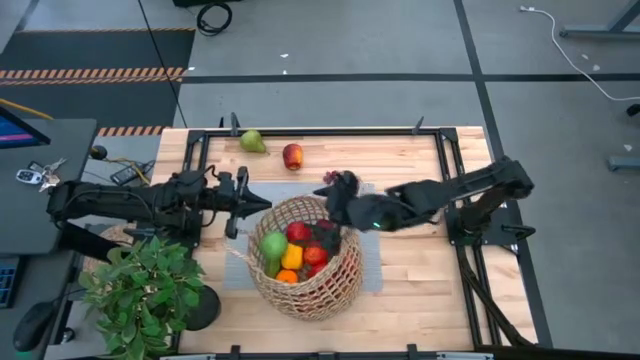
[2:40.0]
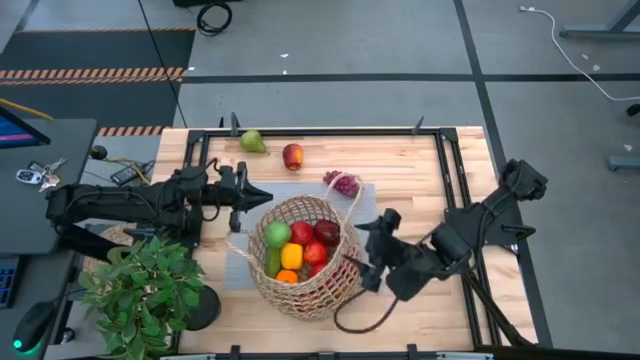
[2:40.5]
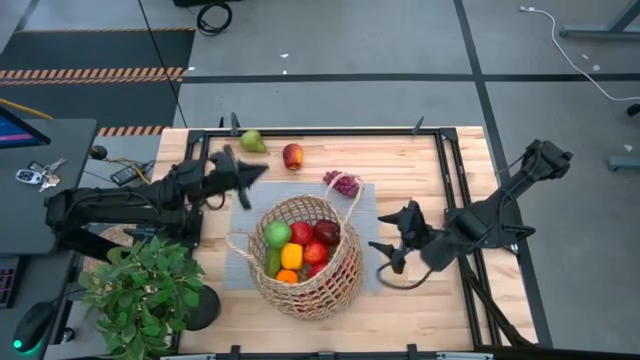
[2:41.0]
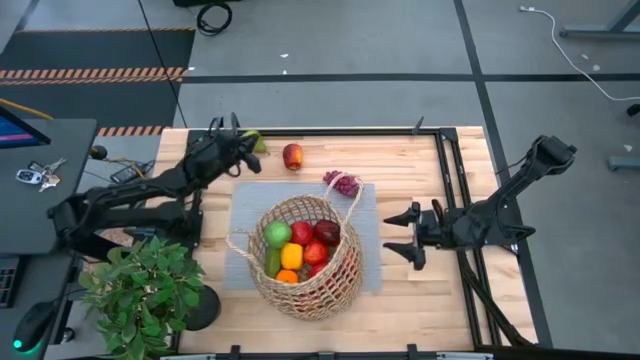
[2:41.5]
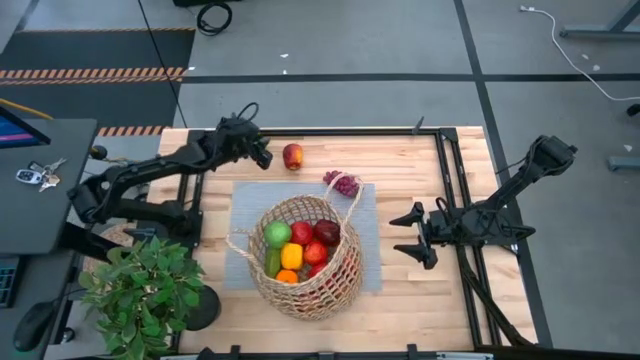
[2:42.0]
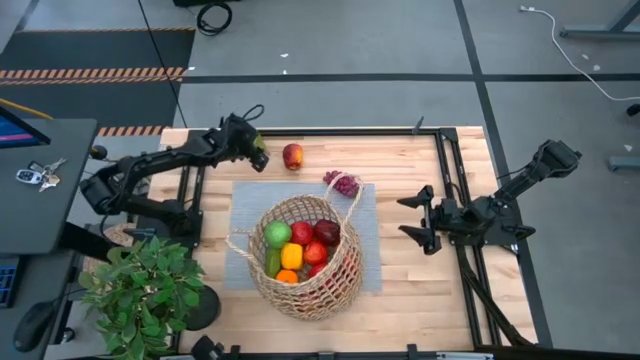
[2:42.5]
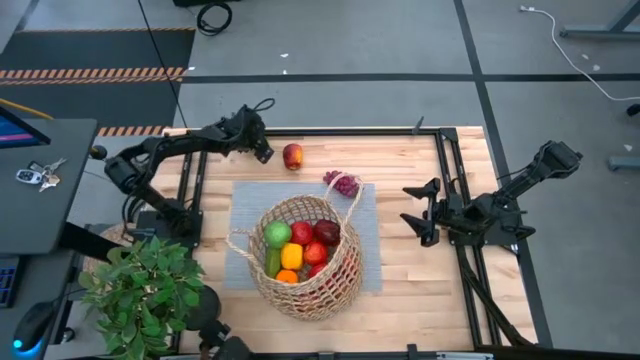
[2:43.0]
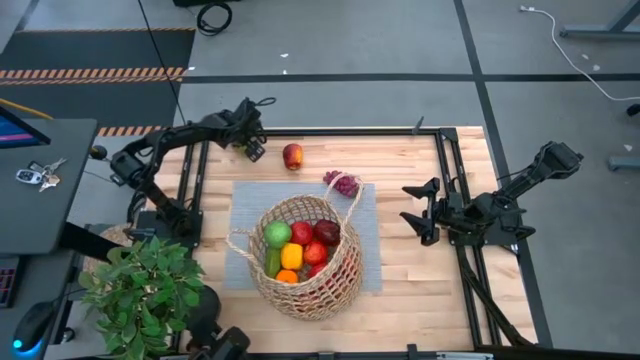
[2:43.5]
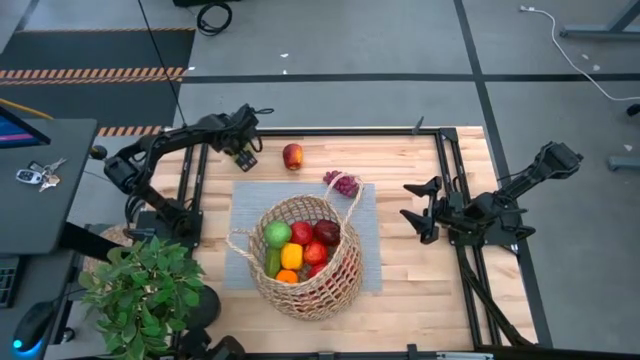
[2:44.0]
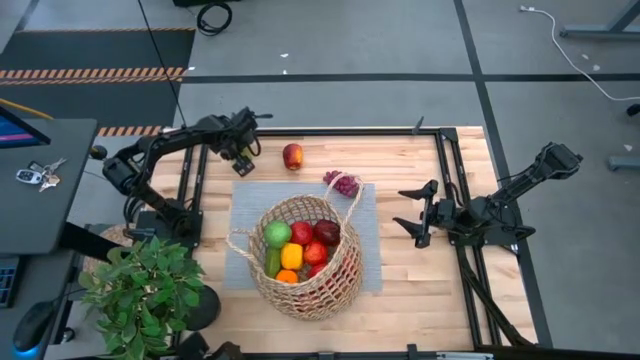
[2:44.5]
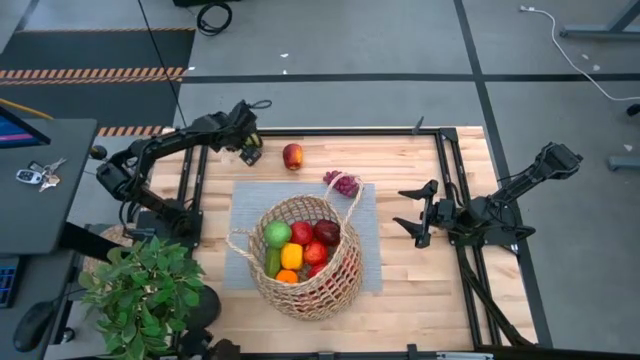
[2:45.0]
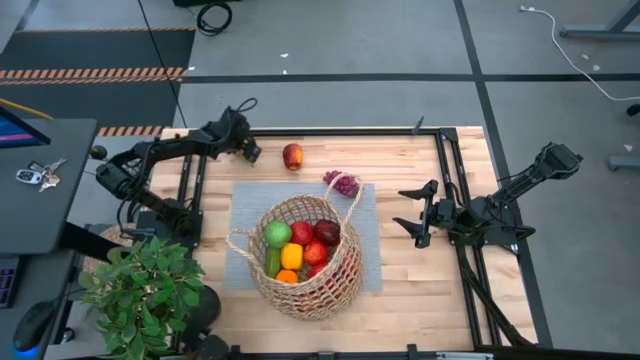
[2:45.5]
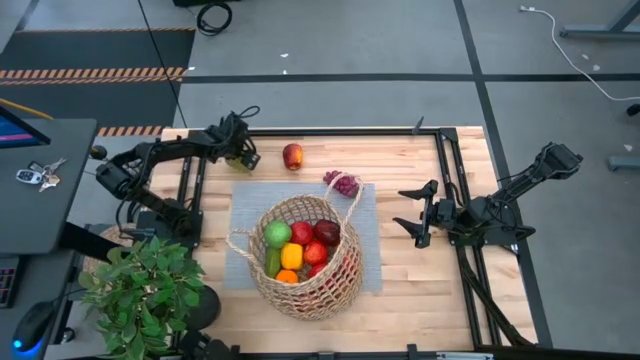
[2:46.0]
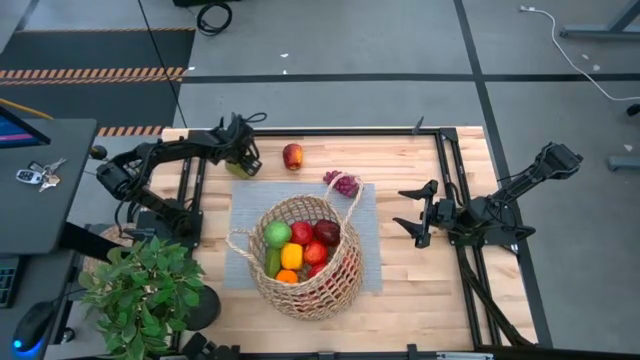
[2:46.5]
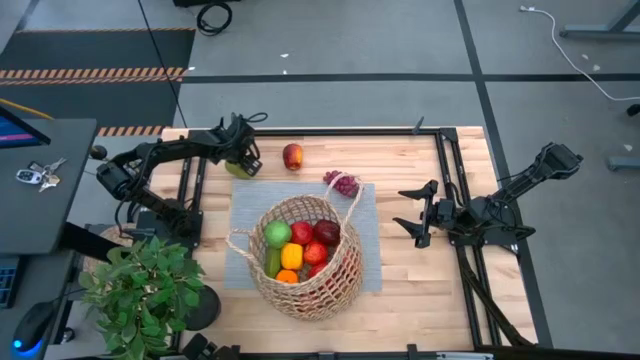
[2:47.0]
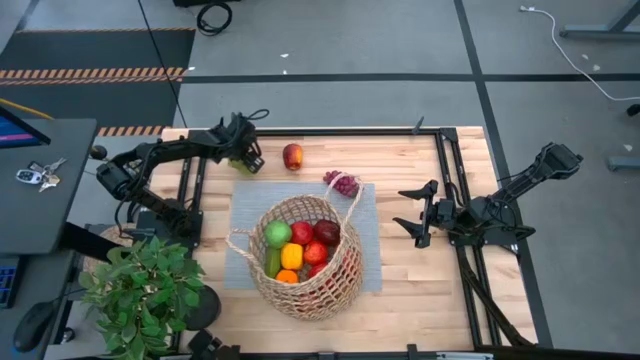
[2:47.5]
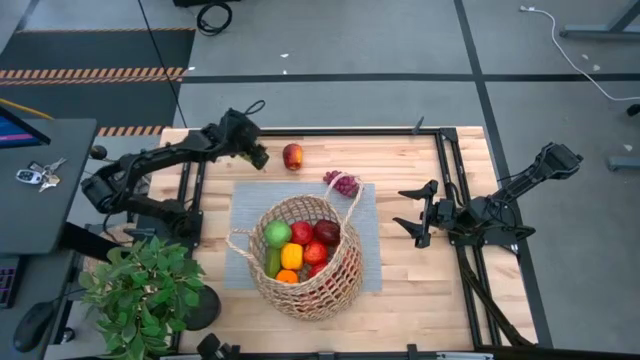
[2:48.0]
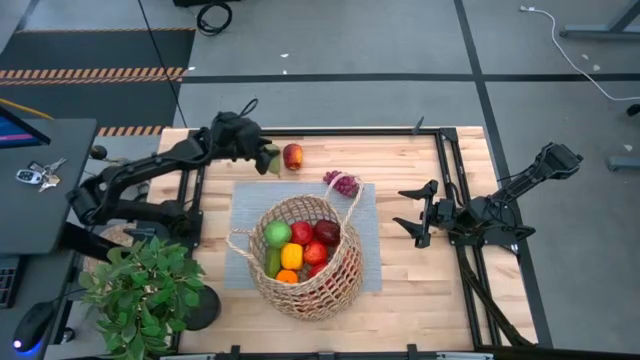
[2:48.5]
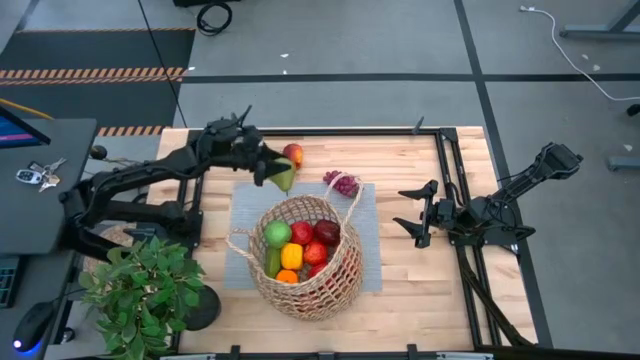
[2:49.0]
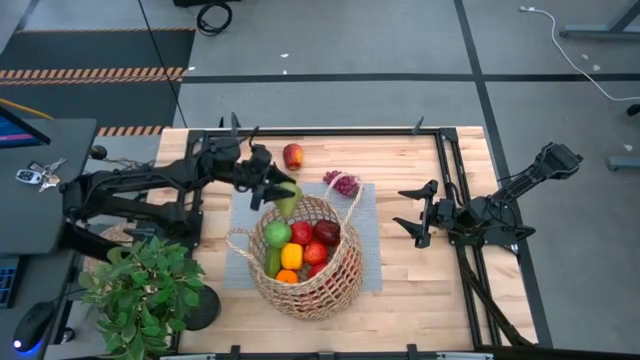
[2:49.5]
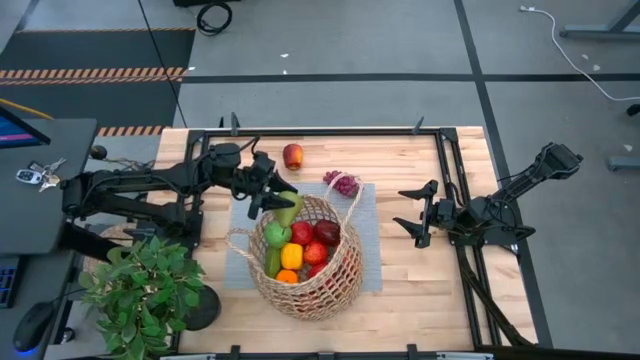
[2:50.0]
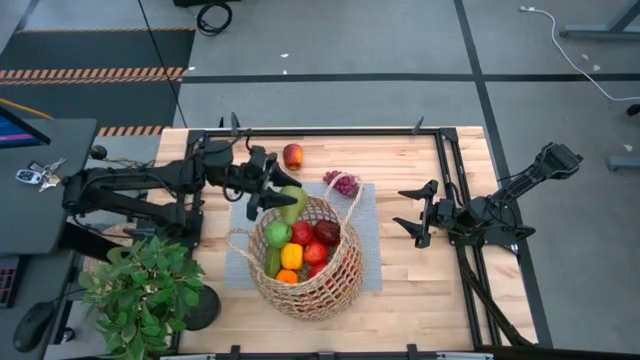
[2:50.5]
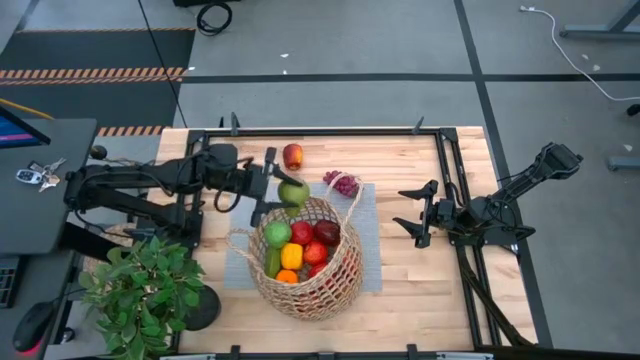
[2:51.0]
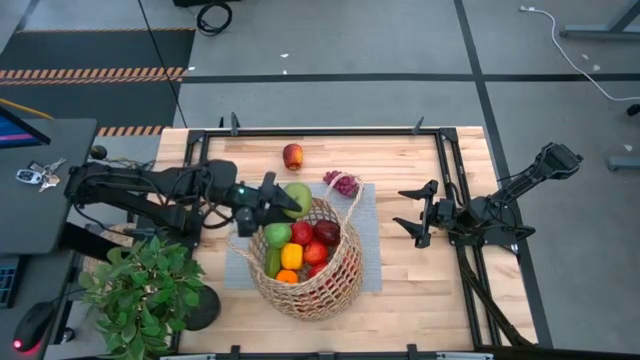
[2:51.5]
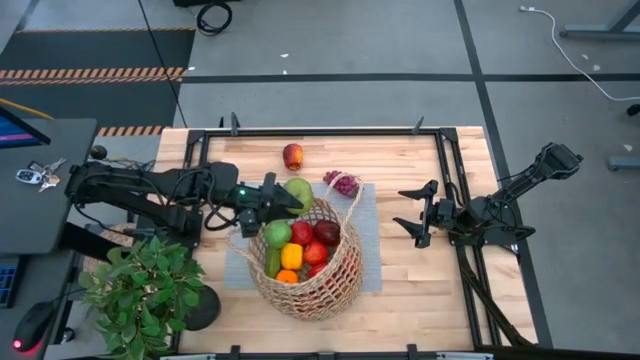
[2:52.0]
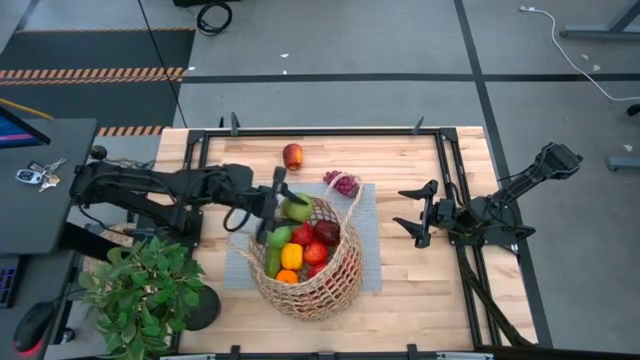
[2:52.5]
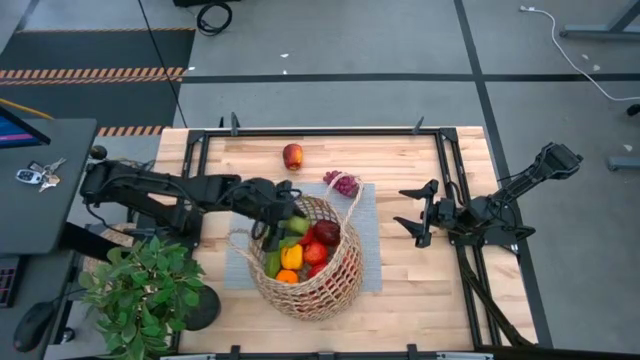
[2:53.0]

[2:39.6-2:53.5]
Task: Build produce basket
Put the green pear into the brown basket

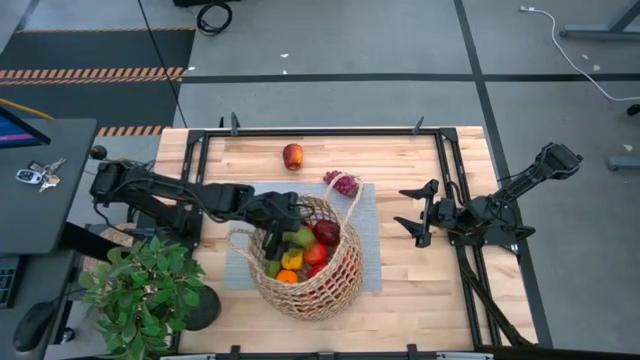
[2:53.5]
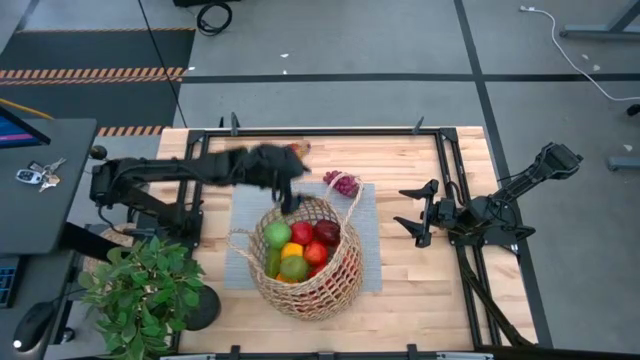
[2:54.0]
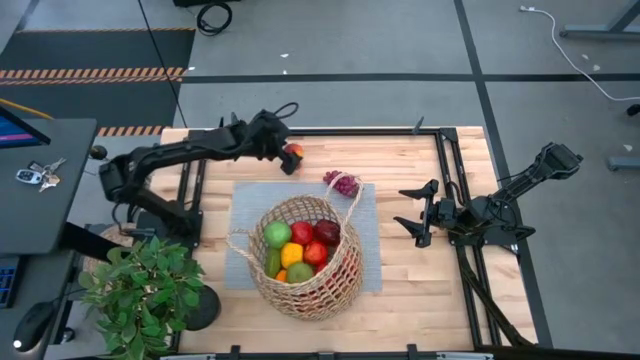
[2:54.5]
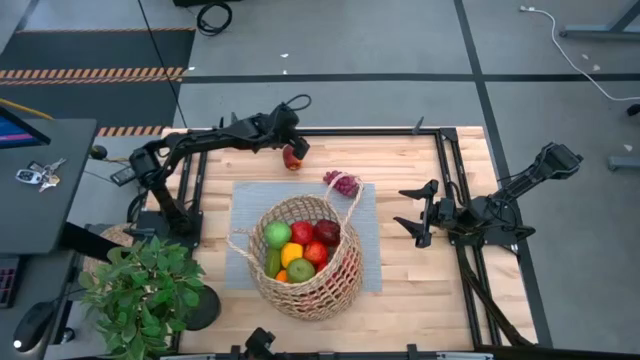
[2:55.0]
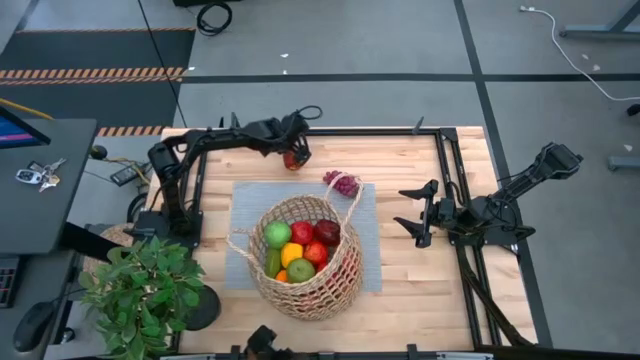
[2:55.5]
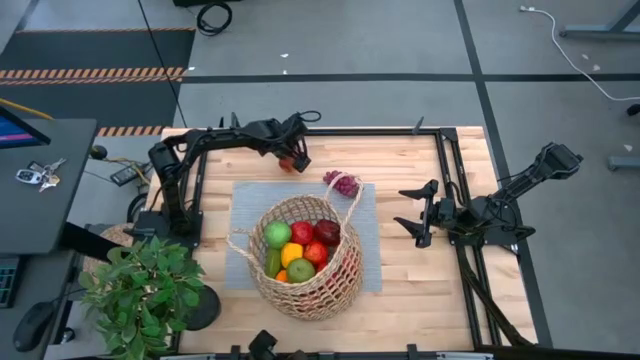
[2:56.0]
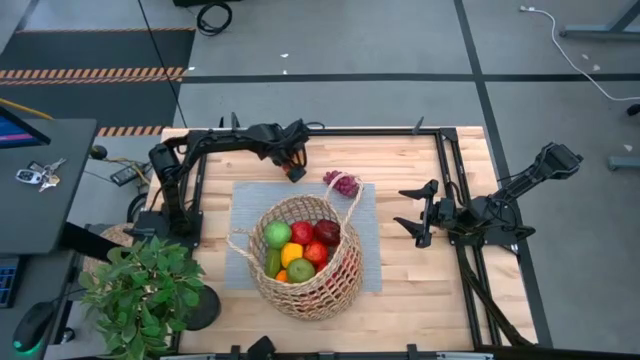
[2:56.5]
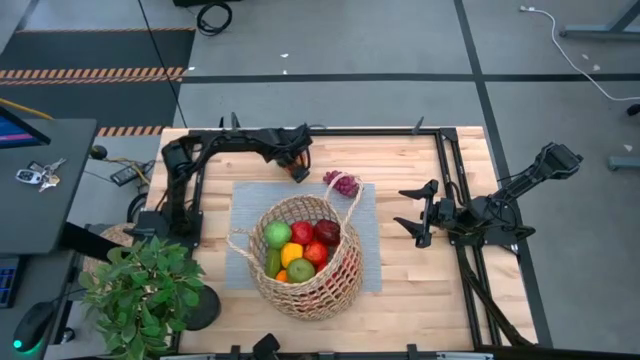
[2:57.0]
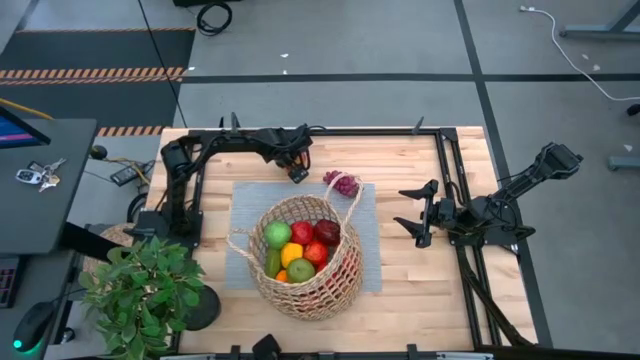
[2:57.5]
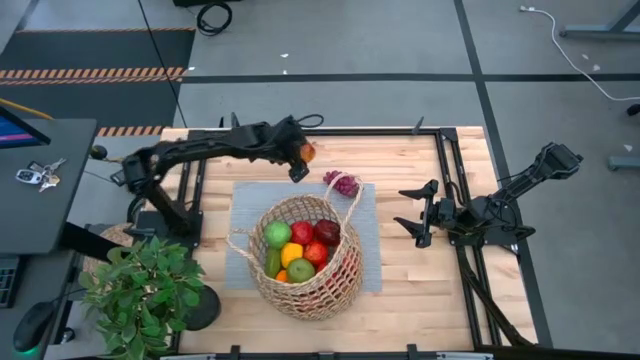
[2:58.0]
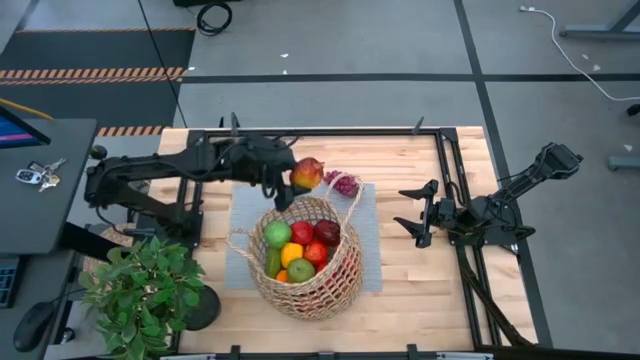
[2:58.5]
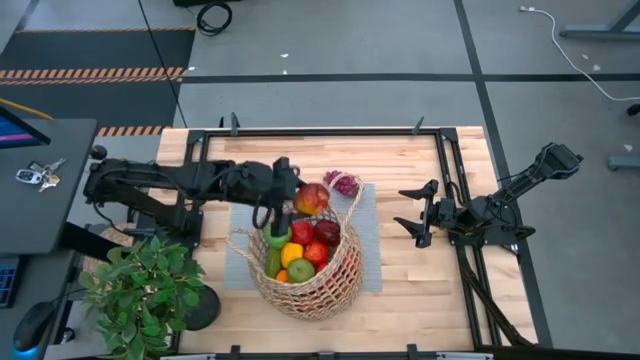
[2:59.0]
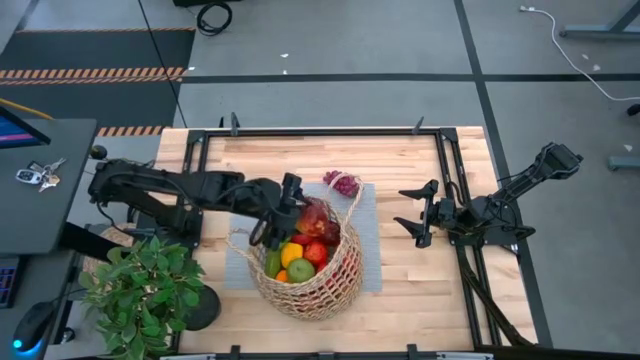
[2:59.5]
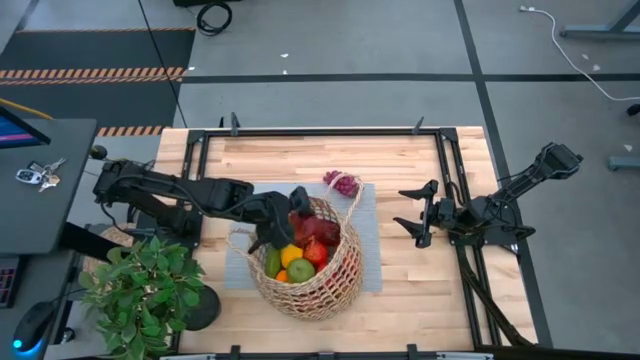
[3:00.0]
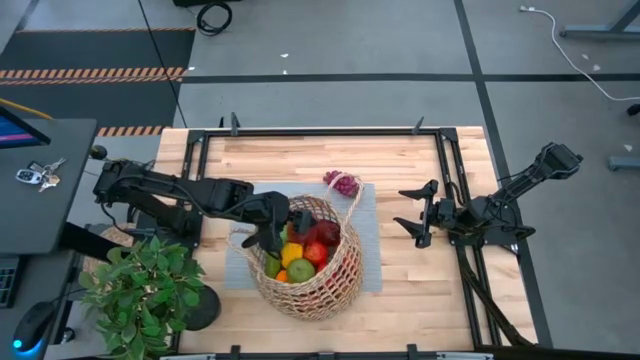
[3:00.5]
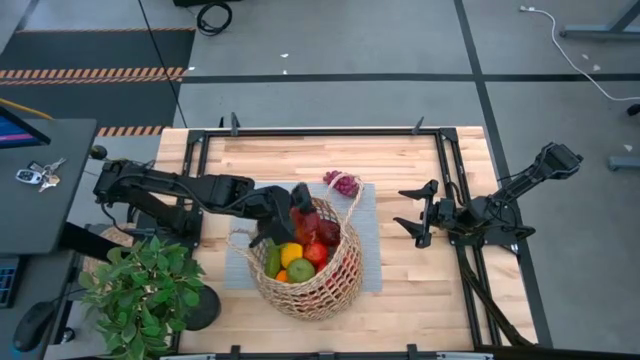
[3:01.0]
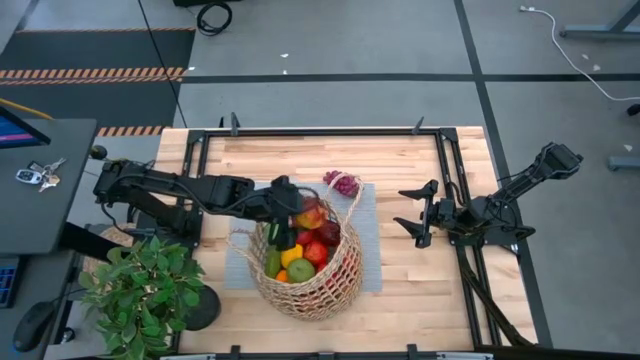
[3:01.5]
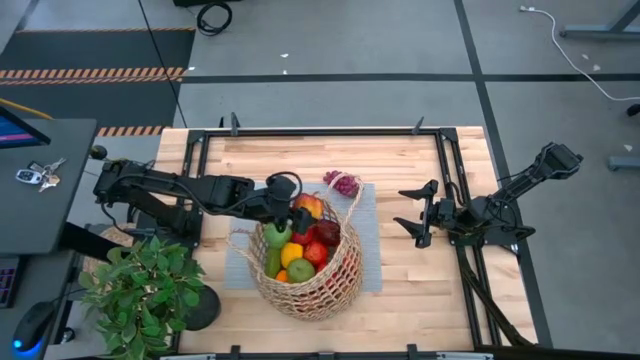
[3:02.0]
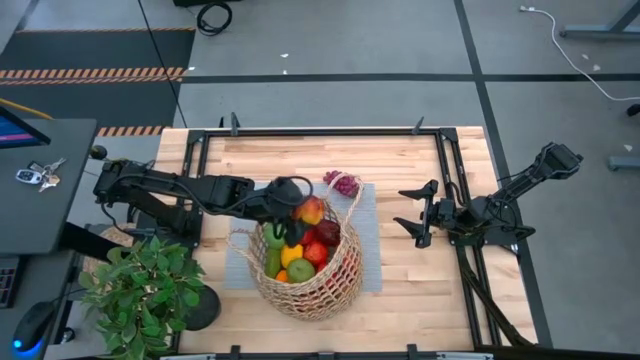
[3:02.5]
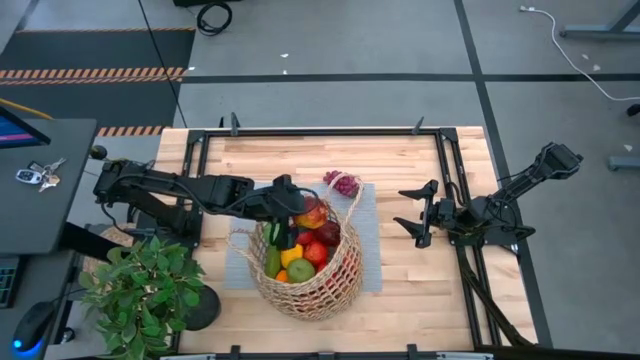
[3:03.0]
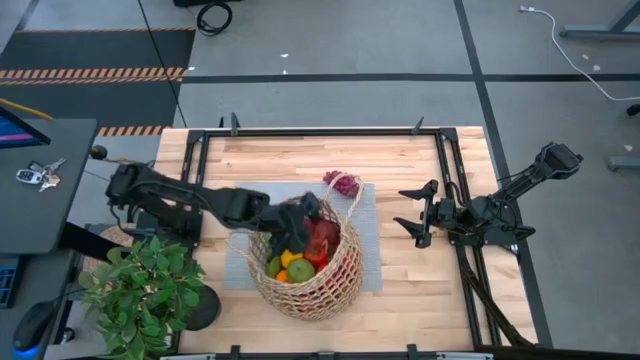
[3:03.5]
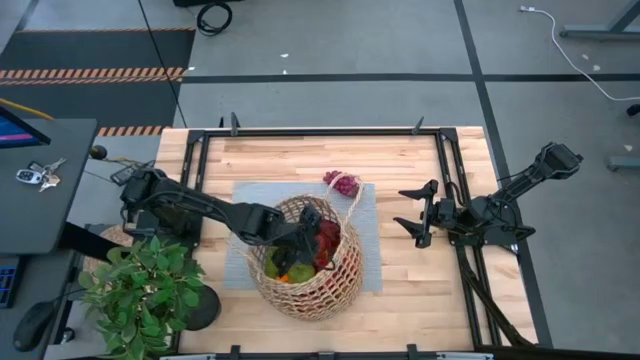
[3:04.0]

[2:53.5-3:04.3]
Put the red apple into the brown basket
